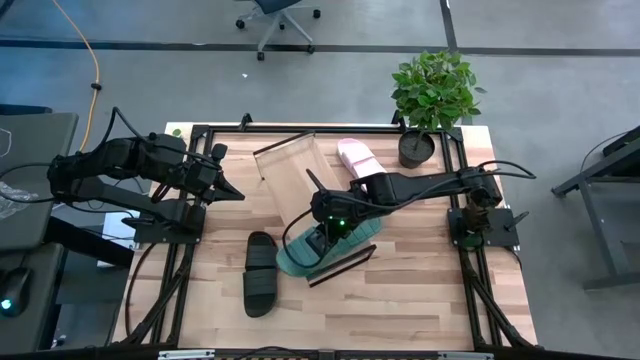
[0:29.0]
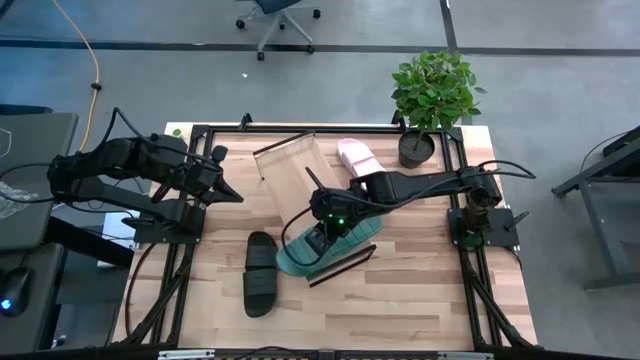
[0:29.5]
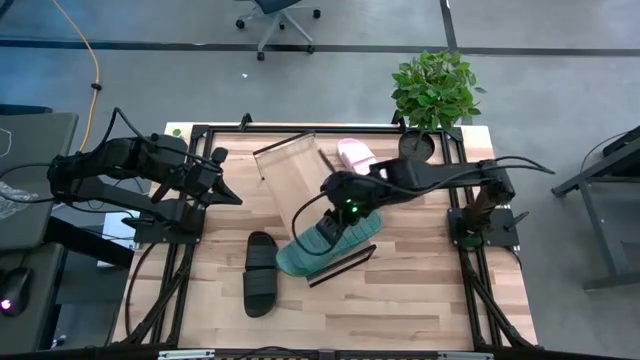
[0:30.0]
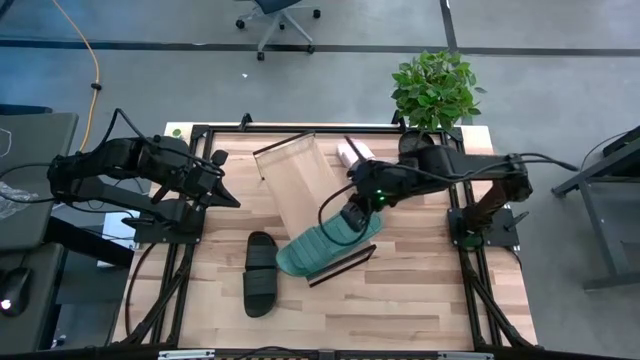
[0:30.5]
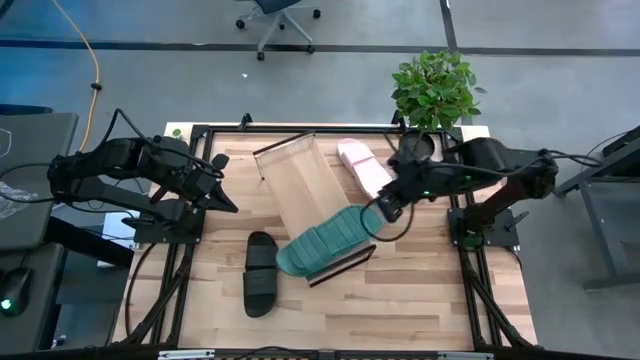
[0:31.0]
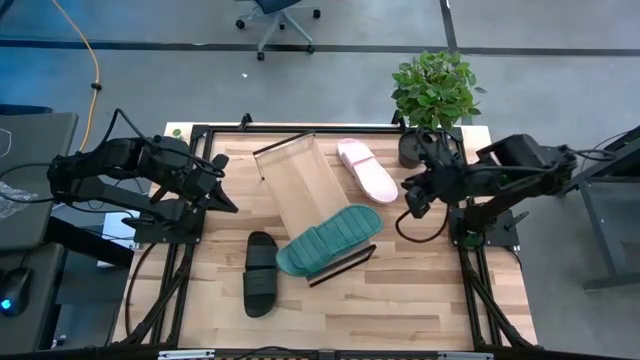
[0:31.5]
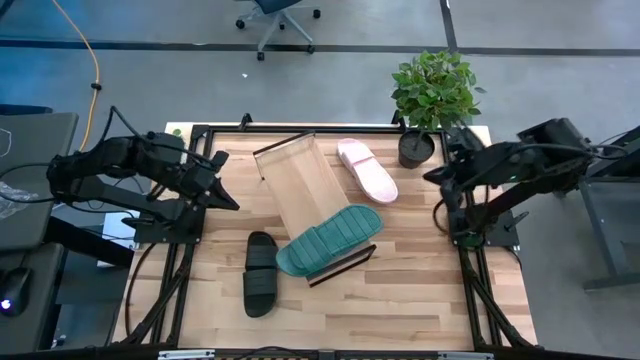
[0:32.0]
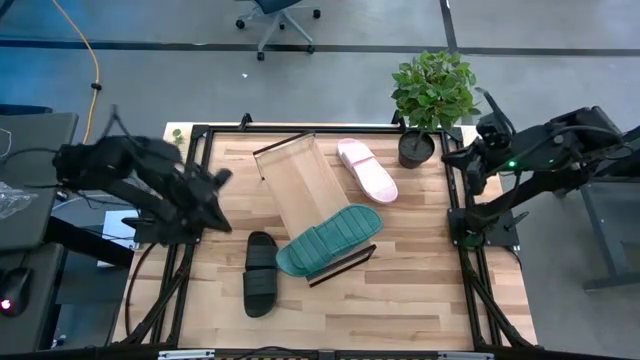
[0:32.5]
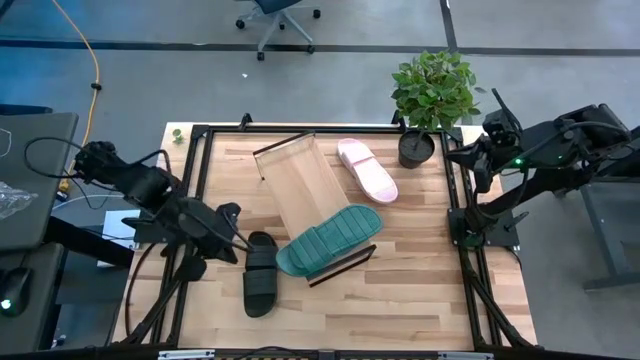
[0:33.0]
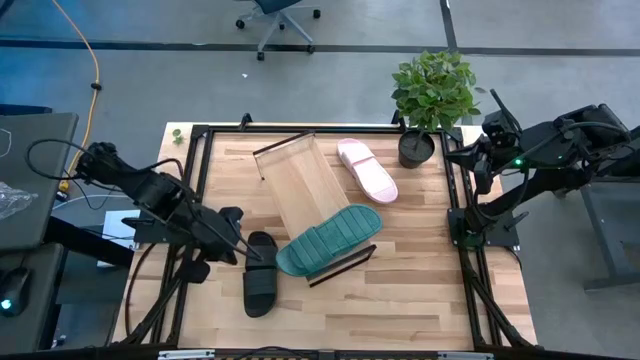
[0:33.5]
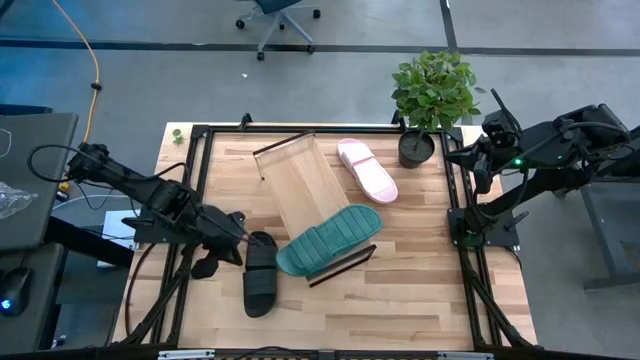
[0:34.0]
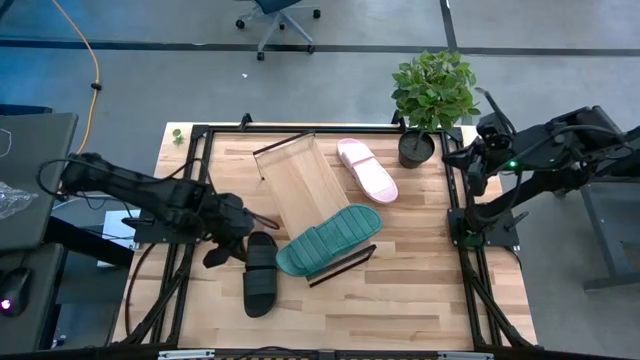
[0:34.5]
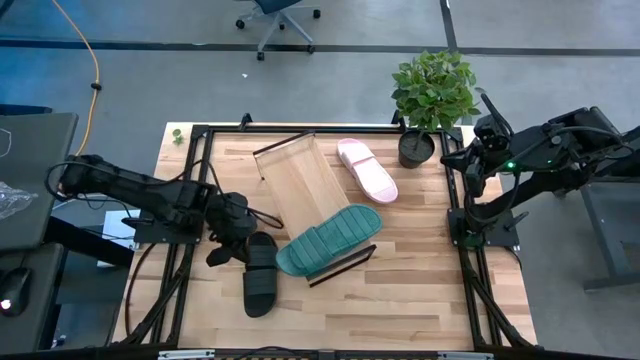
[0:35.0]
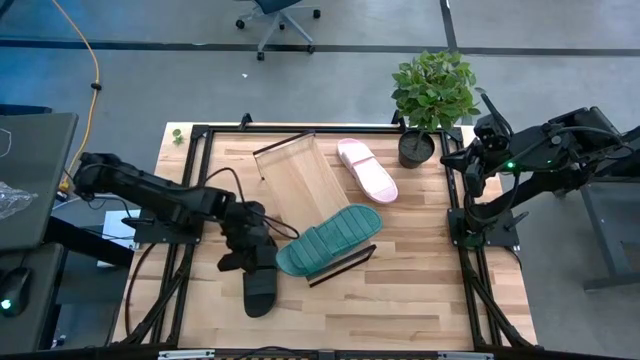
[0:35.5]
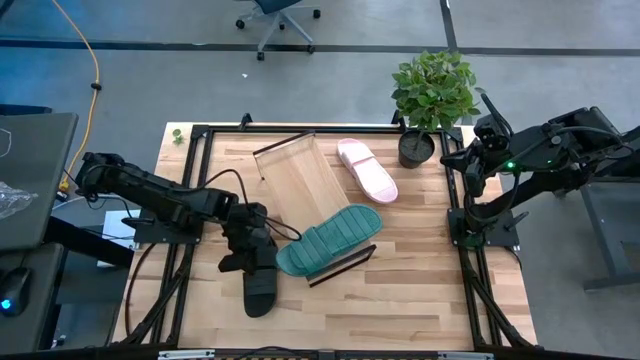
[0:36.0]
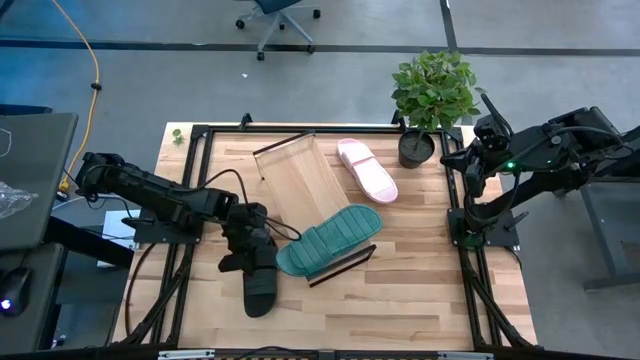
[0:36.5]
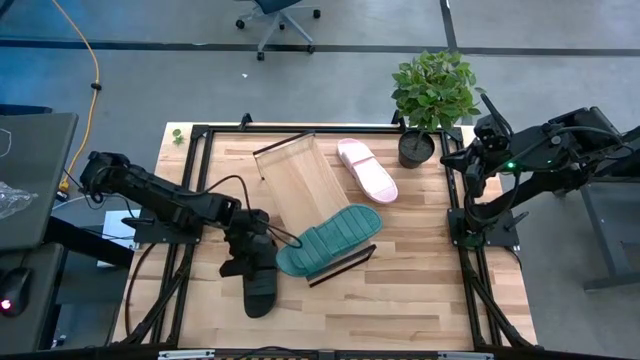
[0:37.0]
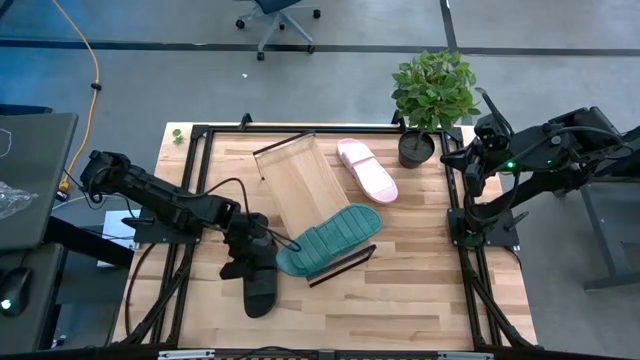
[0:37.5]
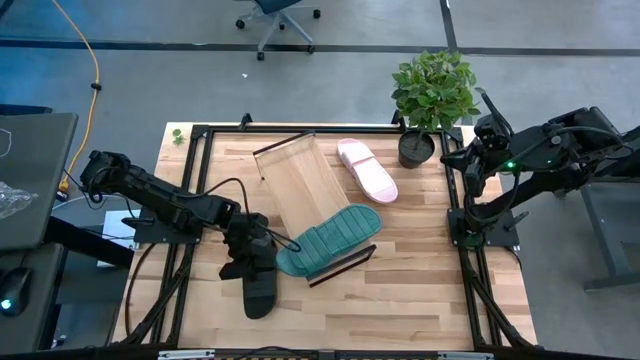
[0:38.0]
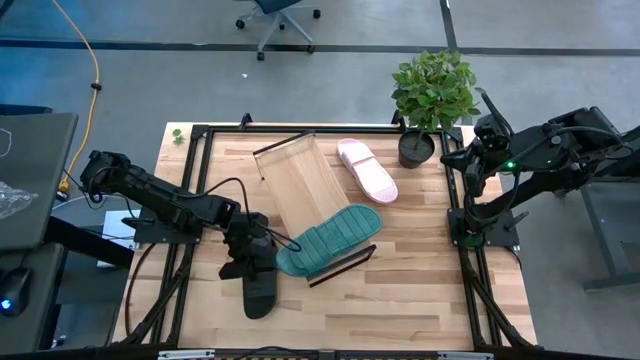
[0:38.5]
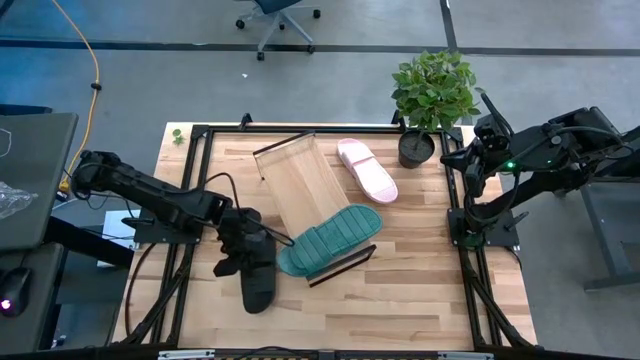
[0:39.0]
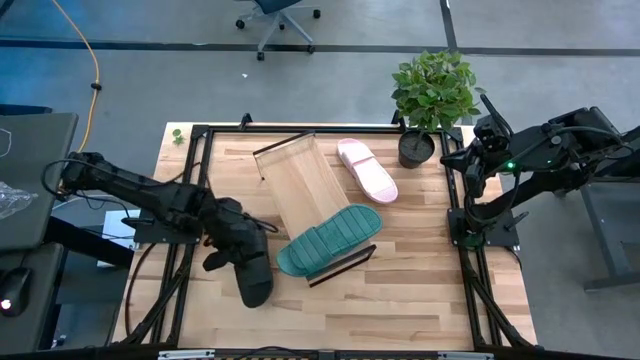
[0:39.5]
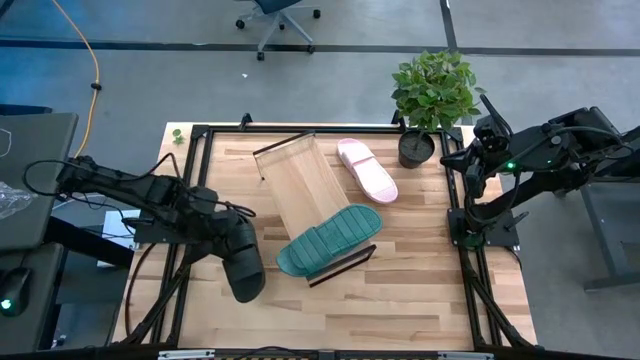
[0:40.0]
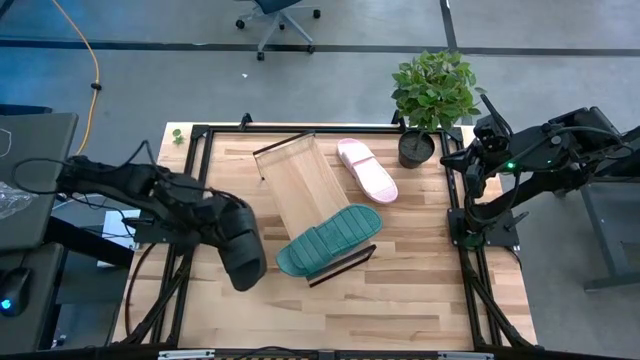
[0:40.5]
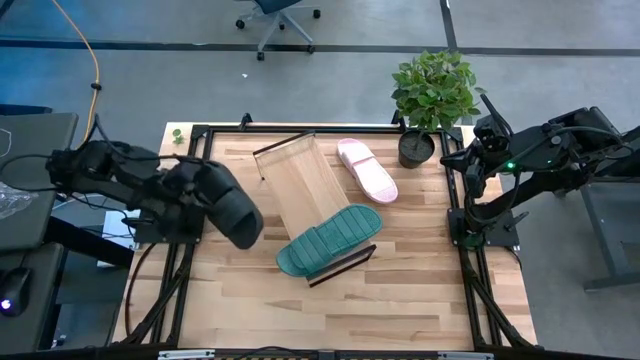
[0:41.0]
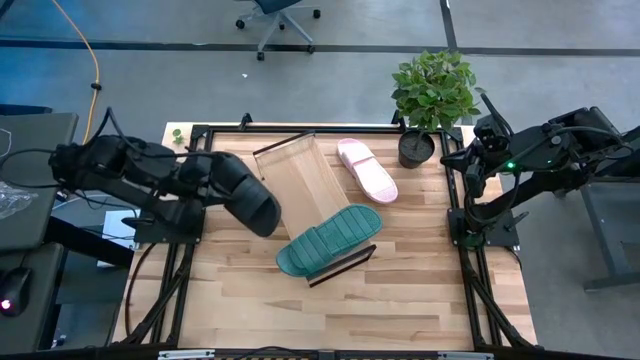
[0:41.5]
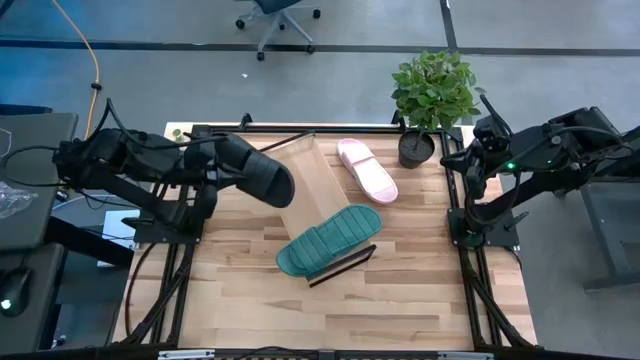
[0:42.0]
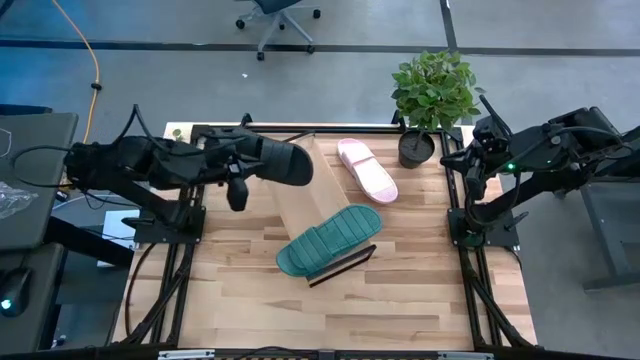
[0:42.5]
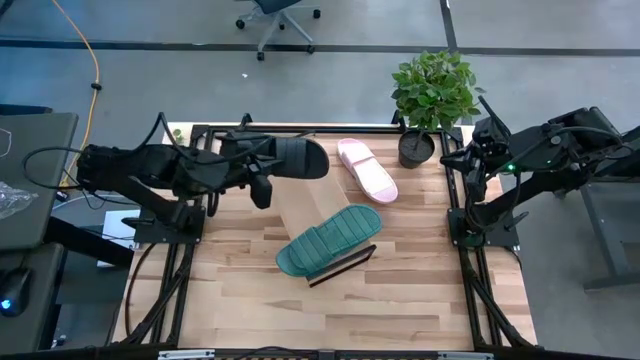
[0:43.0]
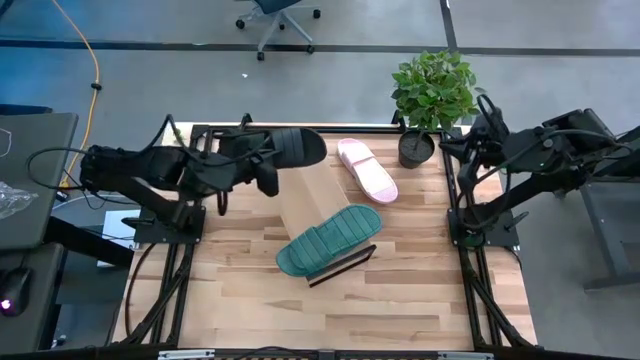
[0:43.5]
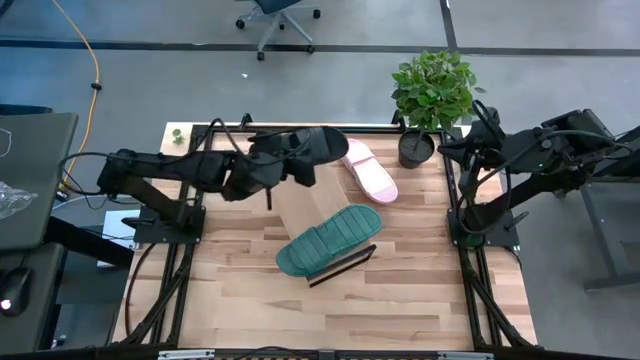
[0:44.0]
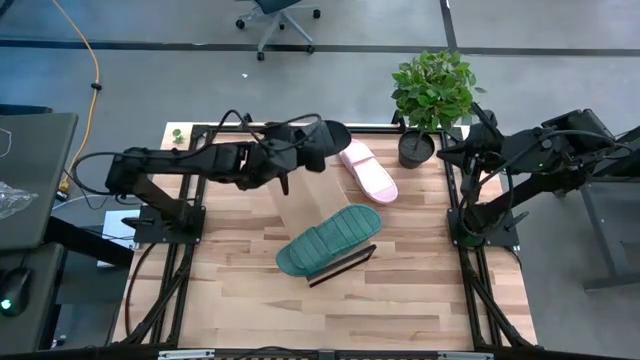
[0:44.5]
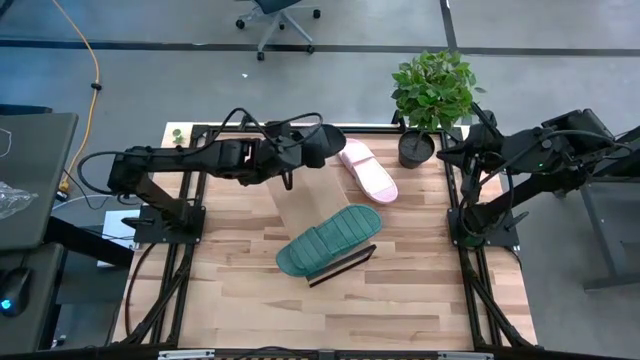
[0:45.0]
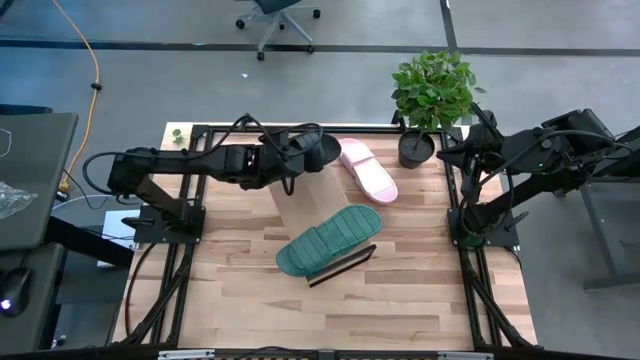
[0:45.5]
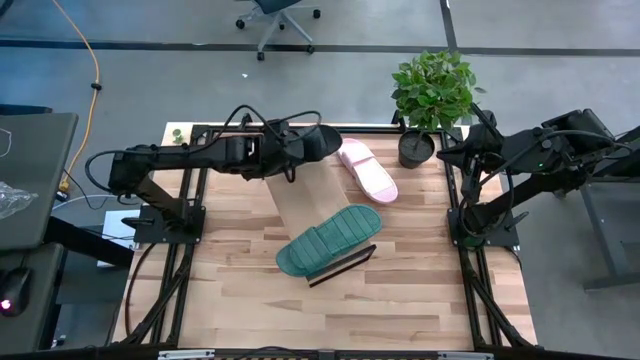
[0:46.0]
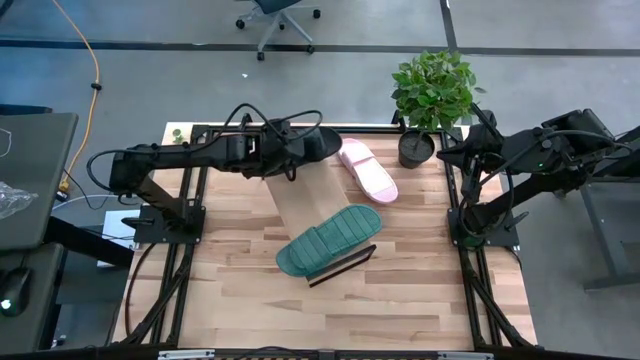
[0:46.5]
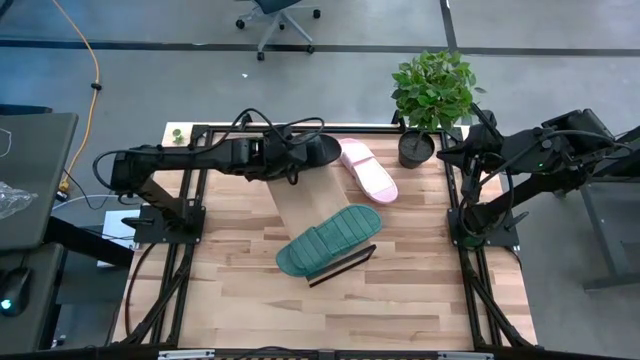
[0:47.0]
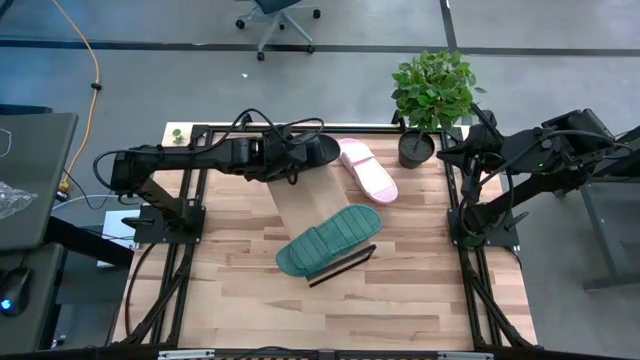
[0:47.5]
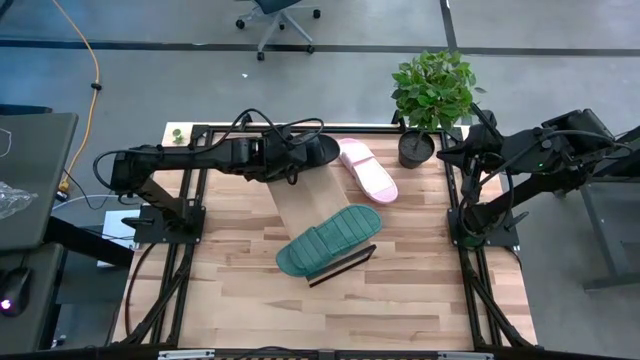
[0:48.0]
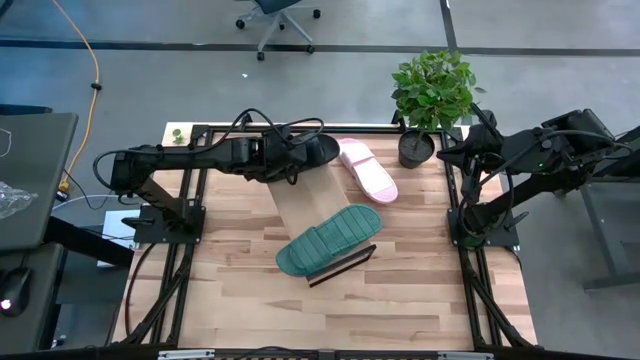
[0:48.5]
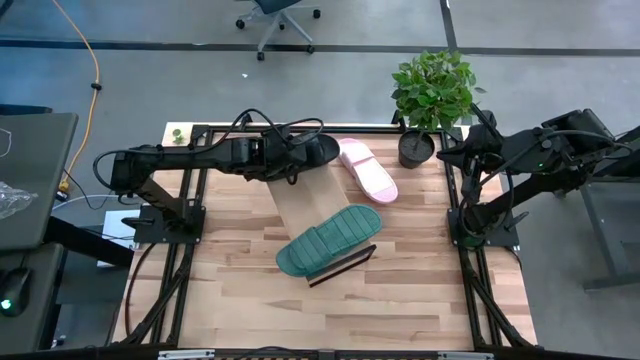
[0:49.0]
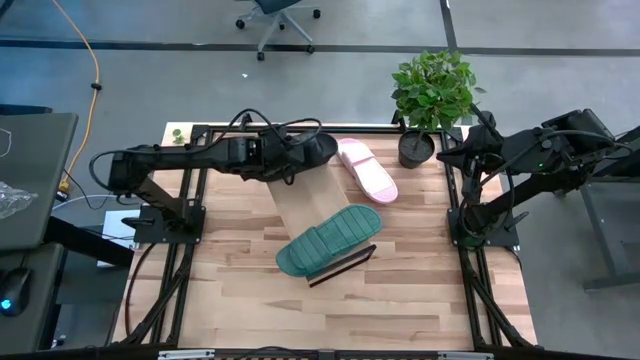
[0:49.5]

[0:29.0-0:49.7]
Task: Pick and place slides into the shelf
Put the black pair of slides on the shelf

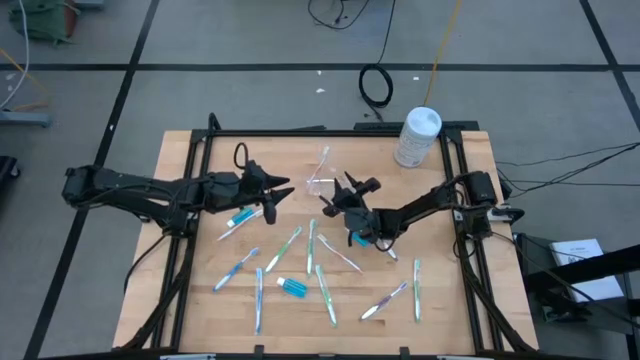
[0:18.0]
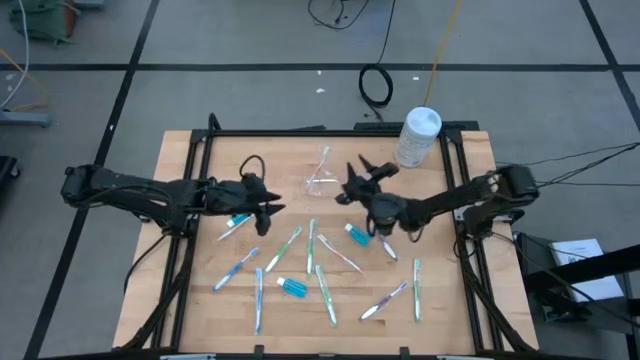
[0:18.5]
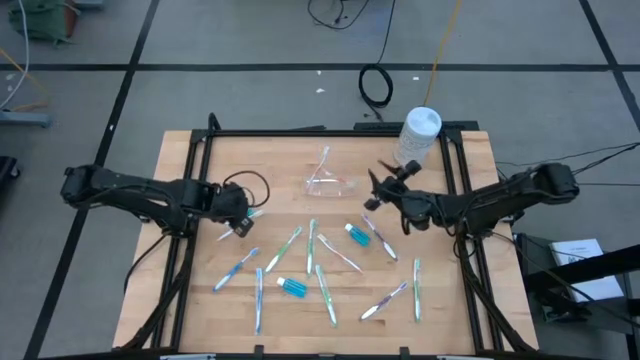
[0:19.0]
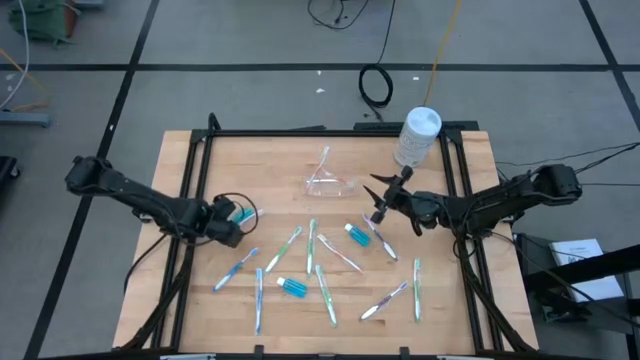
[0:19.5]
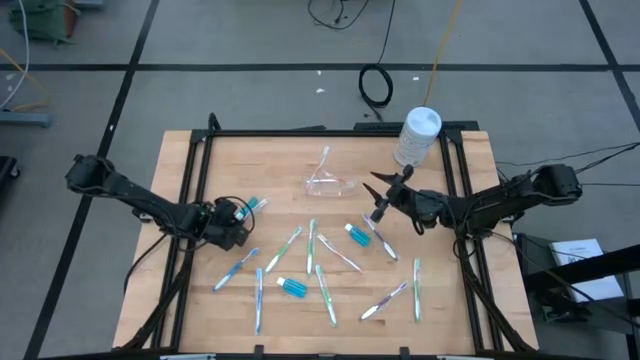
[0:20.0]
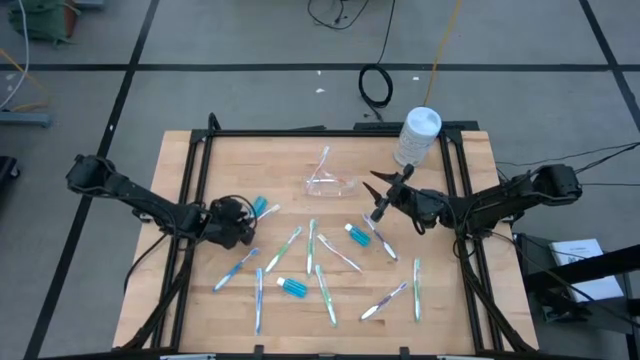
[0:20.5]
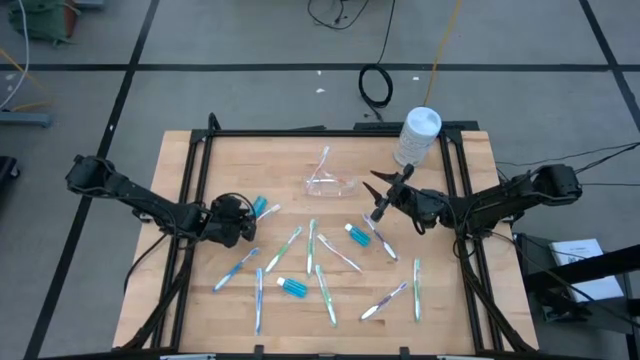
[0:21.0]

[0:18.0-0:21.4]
Task: Pick & Place toothbrushing station
Put the blue mouthwash into the transparent organizer
